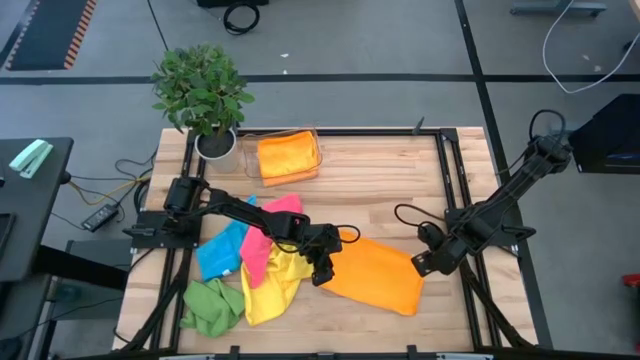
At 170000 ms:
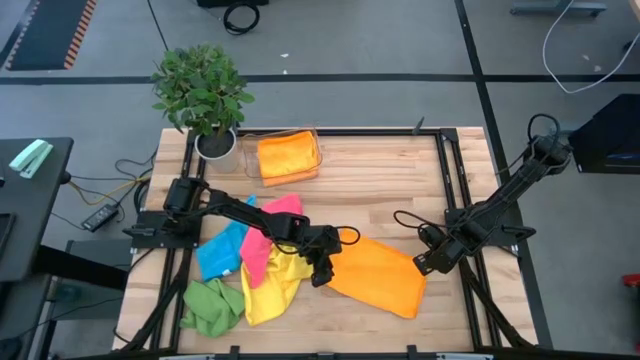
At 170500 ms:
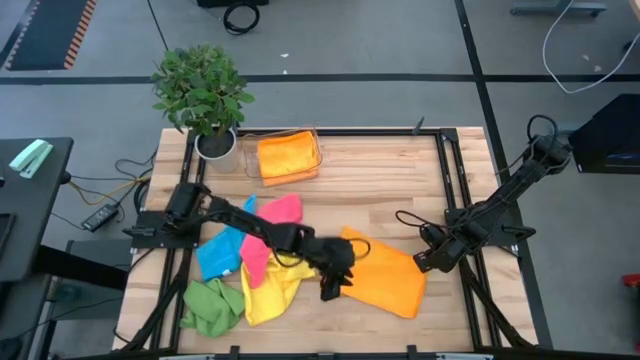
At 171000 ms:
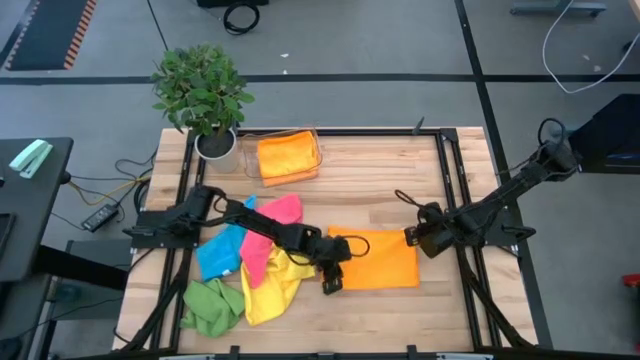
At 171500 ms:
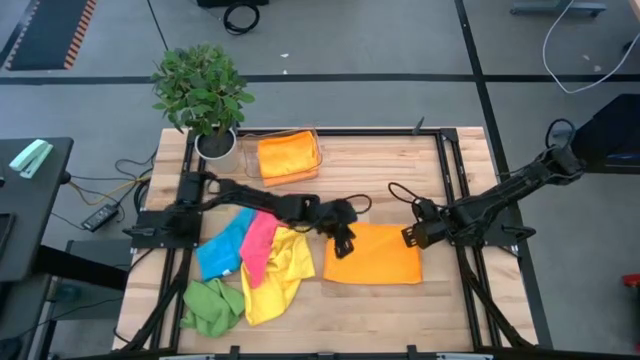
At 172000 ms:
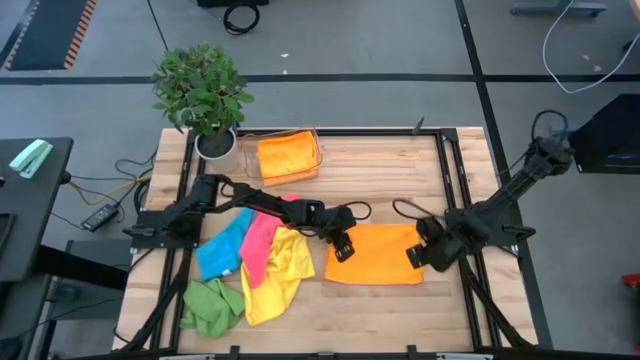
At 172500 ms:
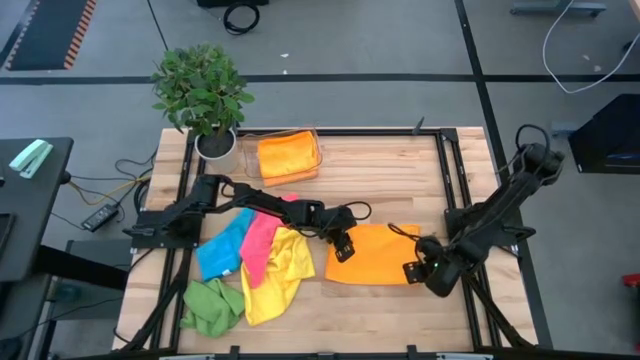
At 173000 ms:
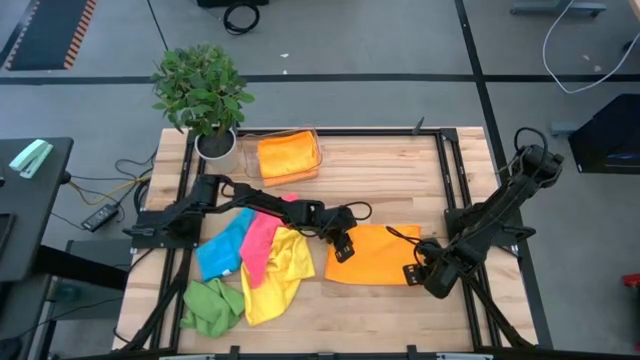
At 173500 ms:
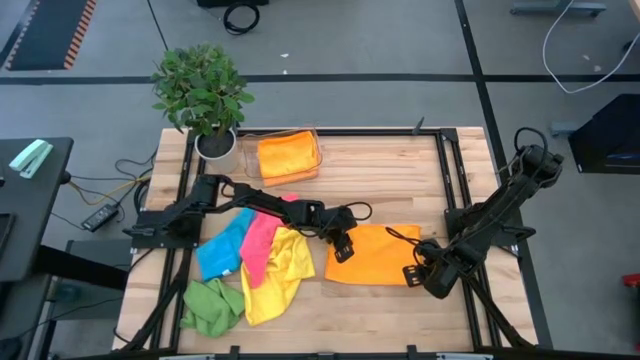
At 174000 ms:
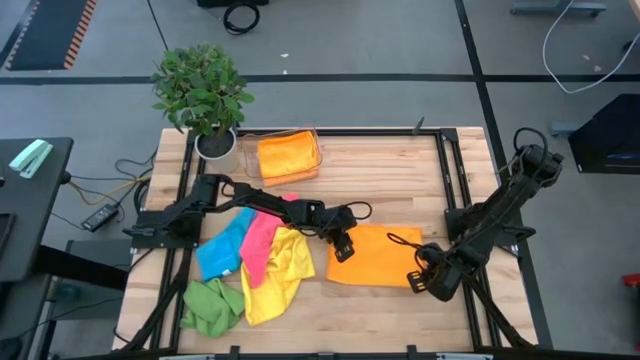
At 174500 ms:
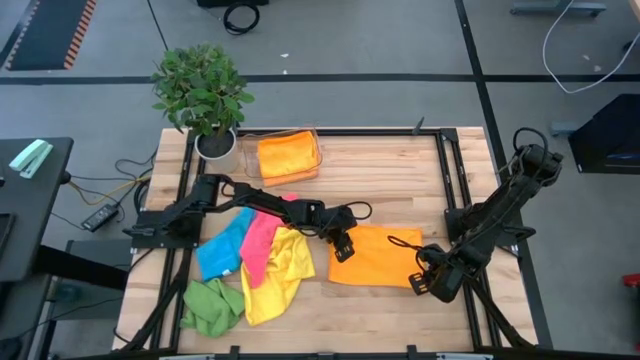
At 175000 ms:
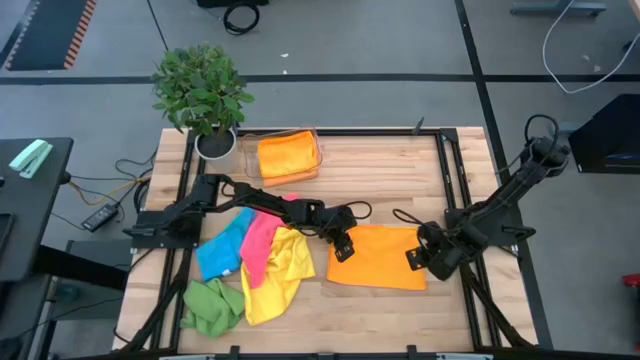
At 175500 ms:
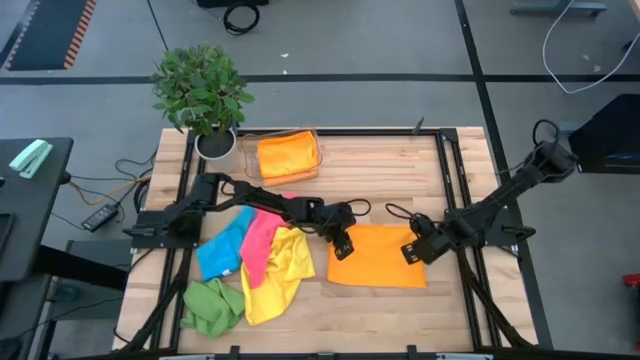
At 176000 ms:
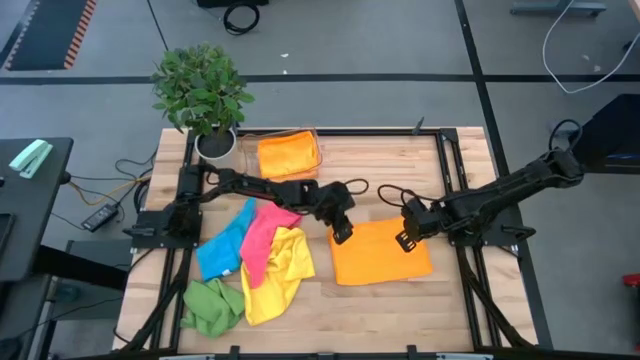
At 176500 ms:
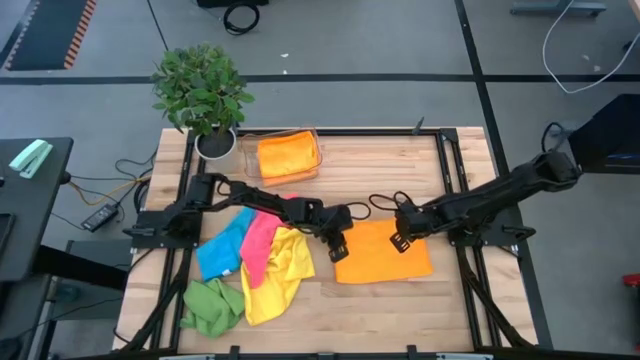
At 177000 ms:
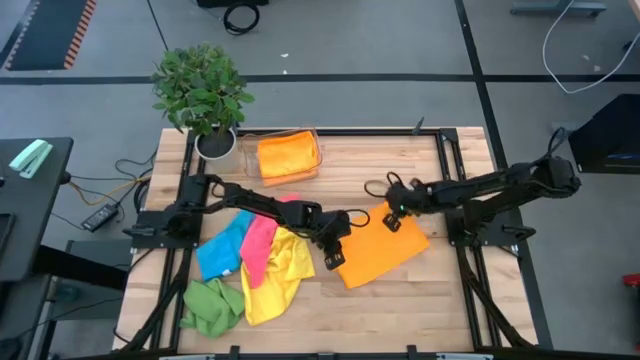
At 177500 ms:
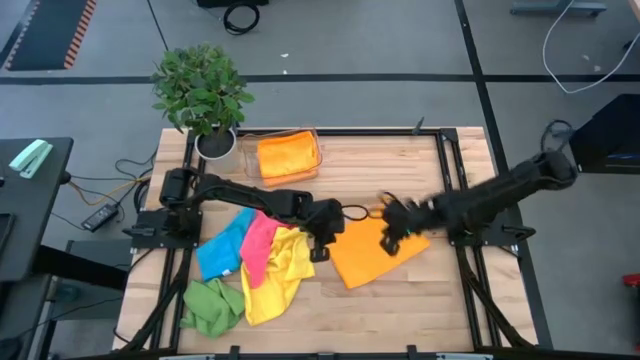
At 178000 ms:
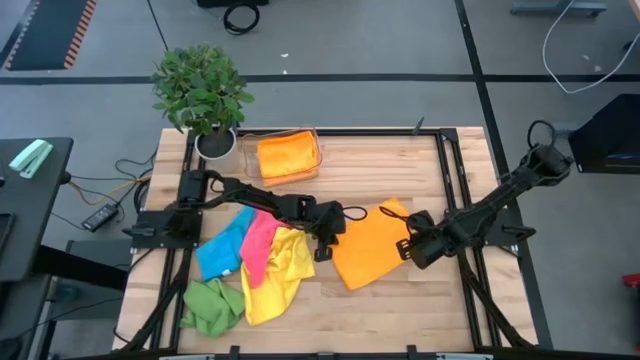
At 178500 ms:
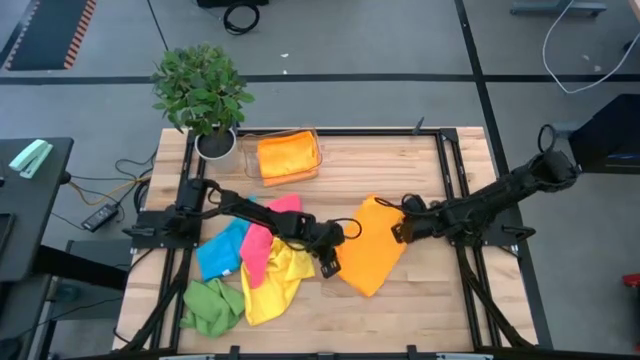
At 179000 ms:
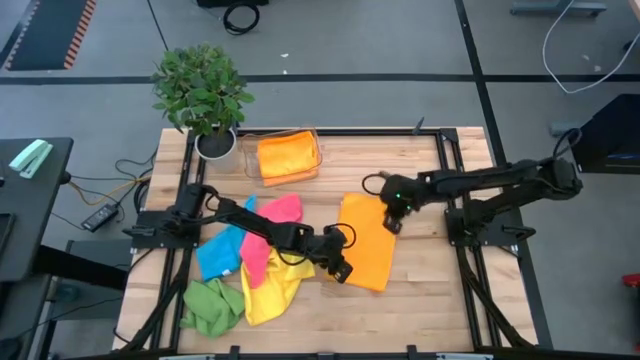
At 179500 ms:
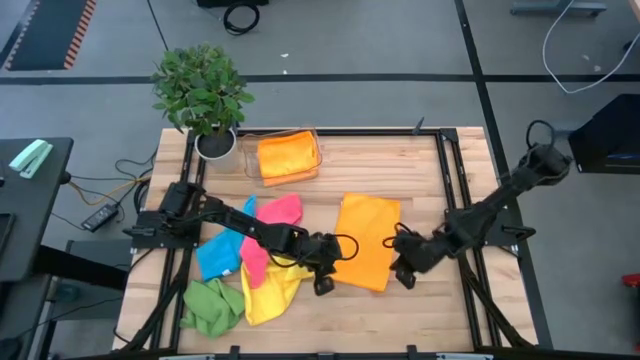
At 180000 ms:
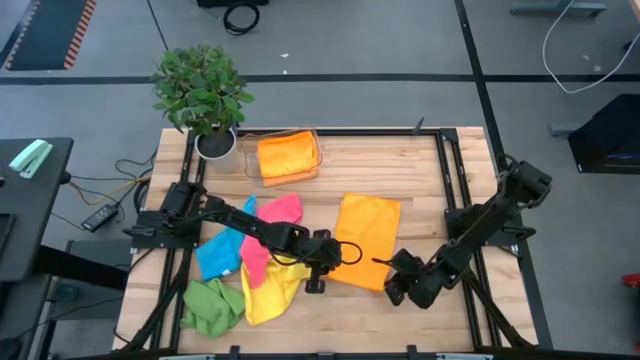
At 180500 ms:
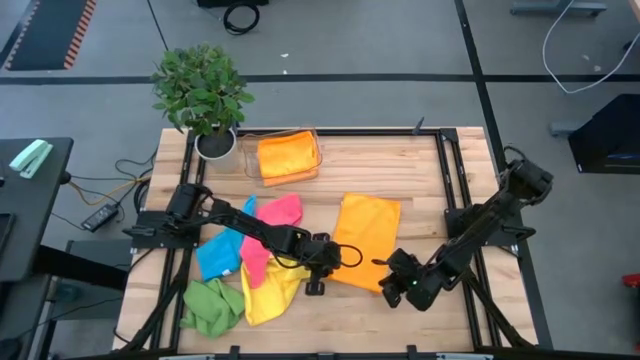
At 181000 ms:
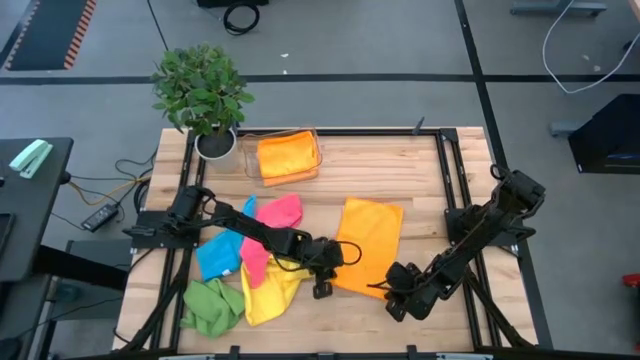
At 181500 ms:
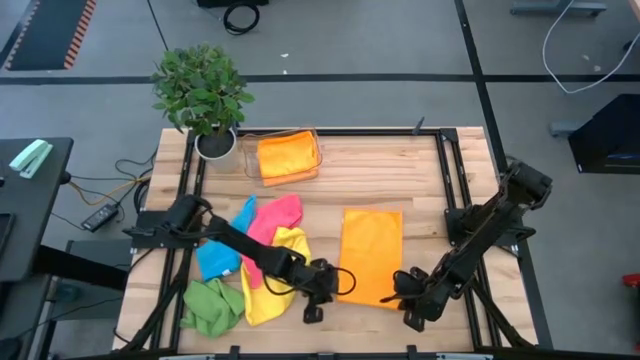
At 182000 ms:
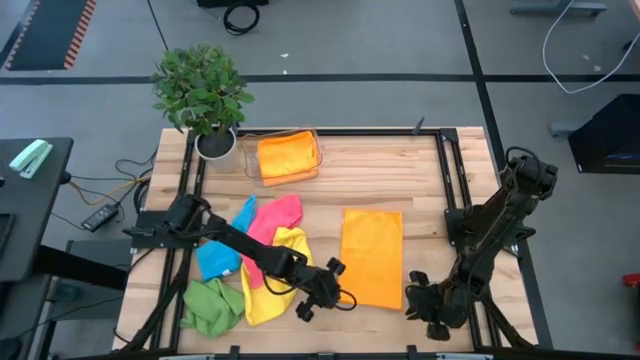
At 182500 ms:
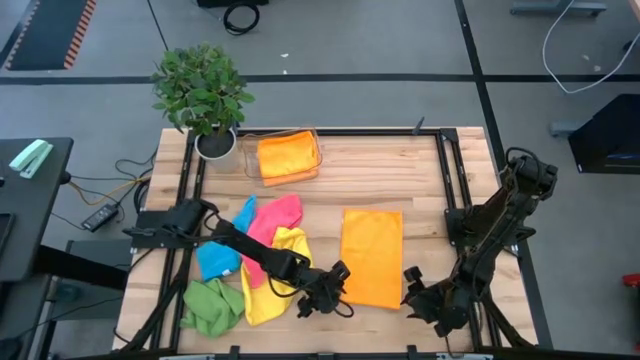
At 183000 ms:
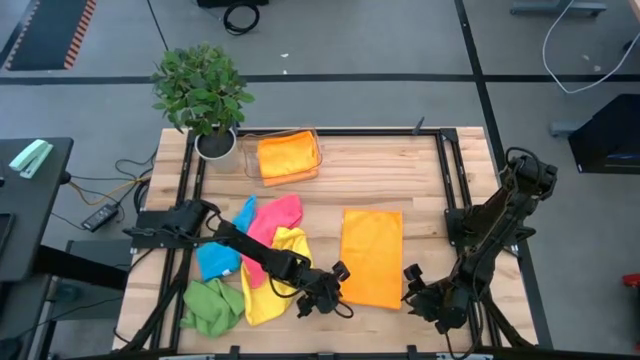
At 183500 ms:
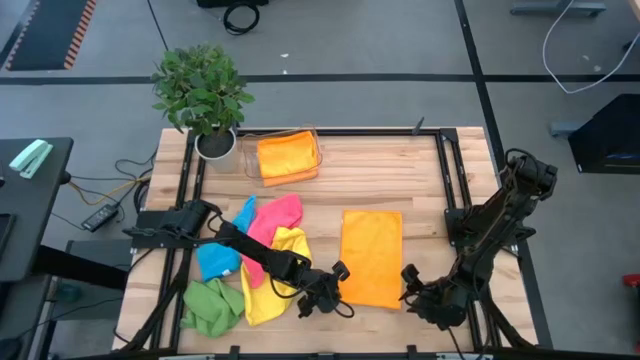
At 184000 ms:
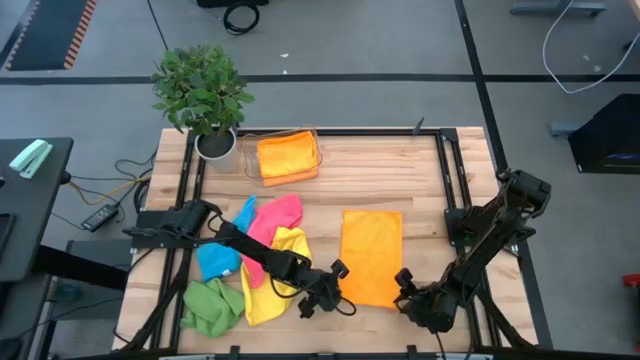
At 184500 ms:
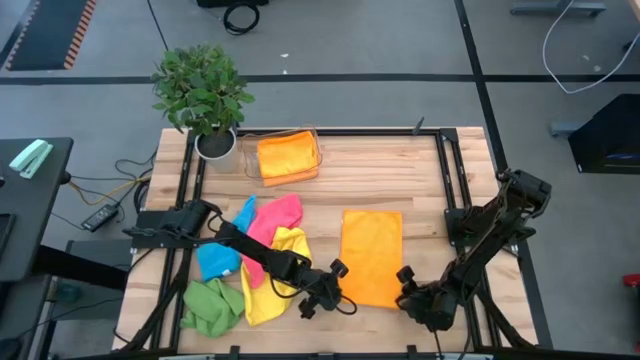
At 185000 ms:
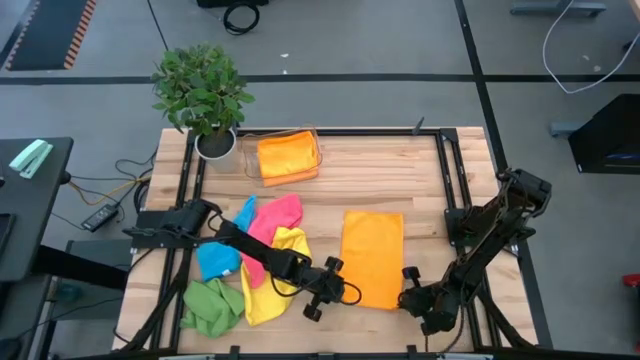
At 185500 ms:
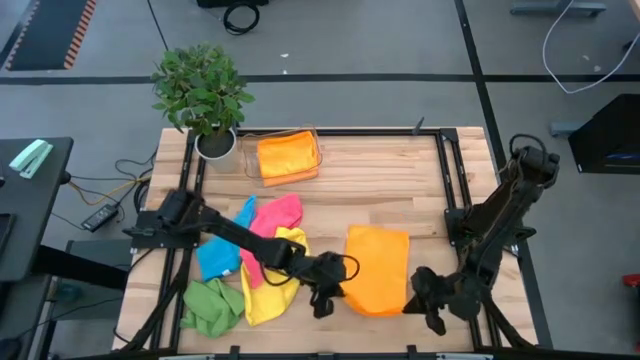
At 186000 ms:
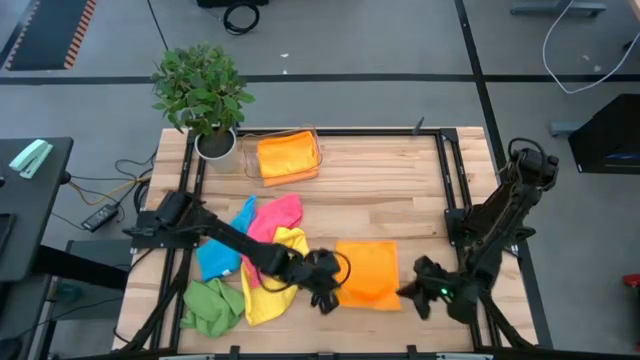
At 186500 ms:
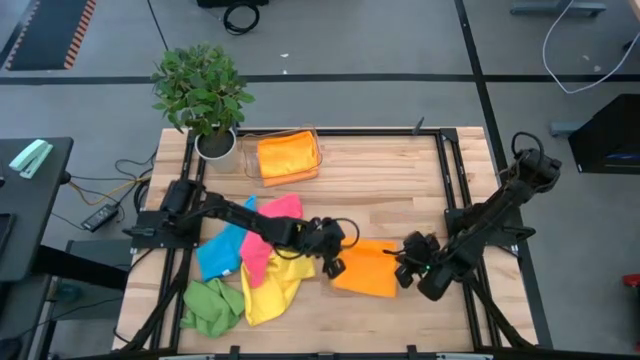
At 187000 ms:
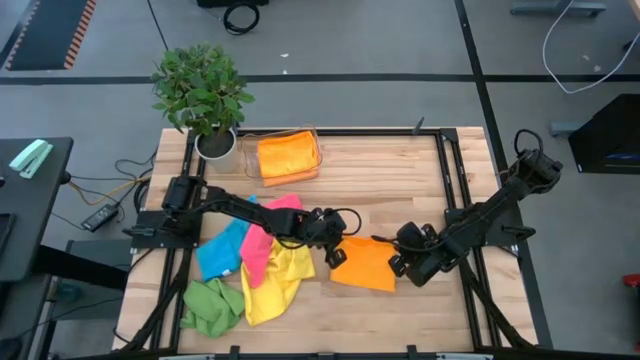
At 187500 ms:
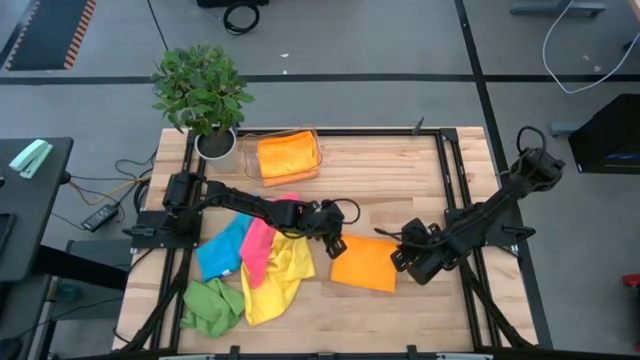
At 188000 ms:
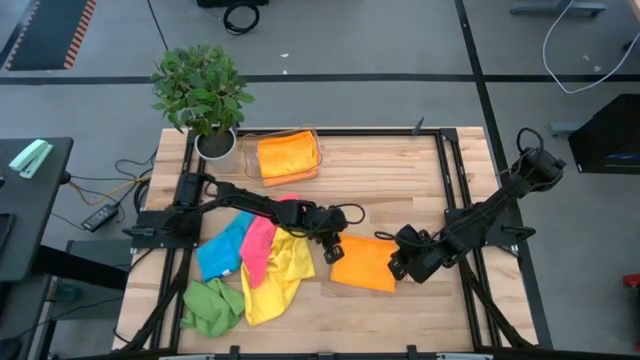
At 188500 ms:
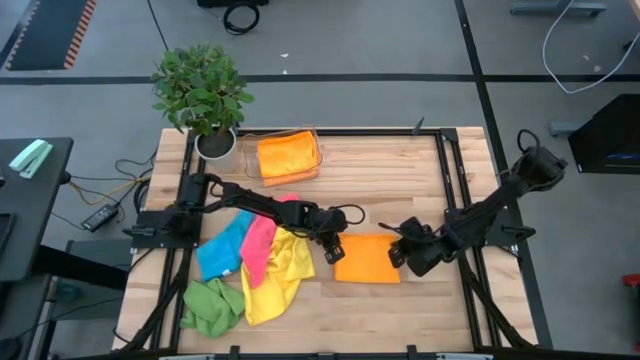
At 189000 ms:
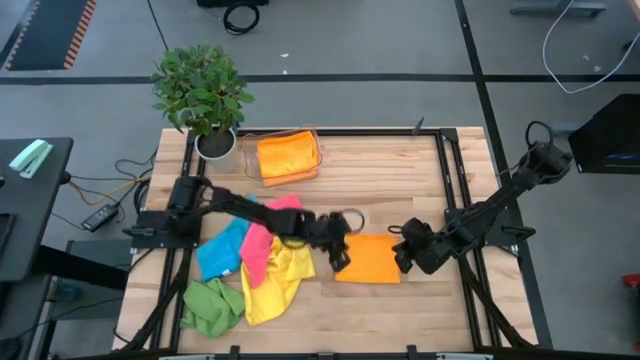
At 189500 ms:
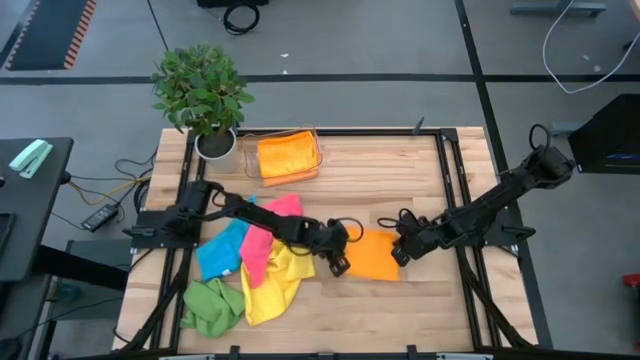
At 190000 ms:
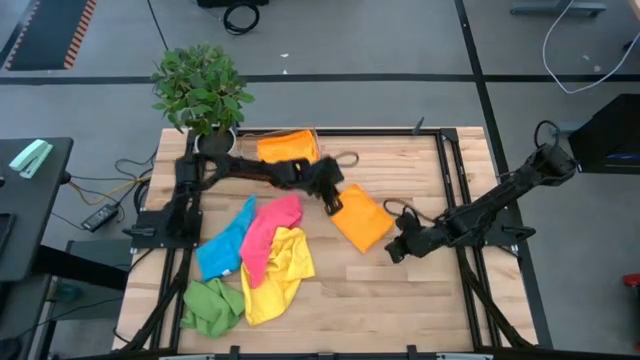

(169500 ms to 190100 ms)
Task: Fold microfiber towels
Fold the orange microfiber cloth

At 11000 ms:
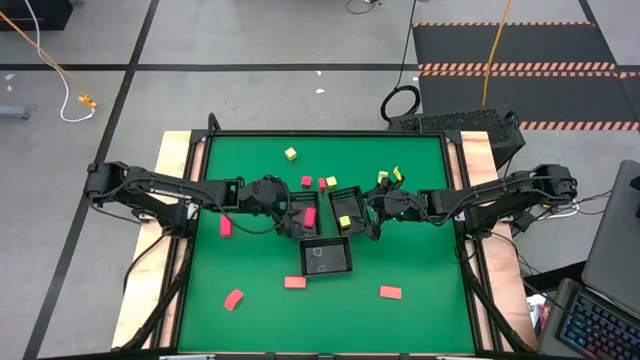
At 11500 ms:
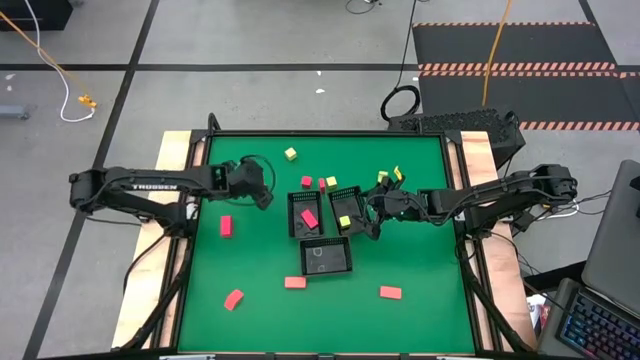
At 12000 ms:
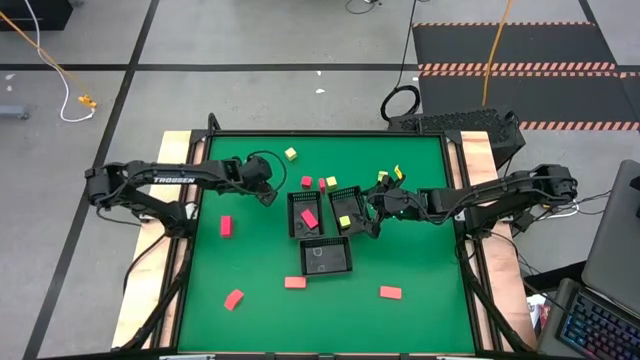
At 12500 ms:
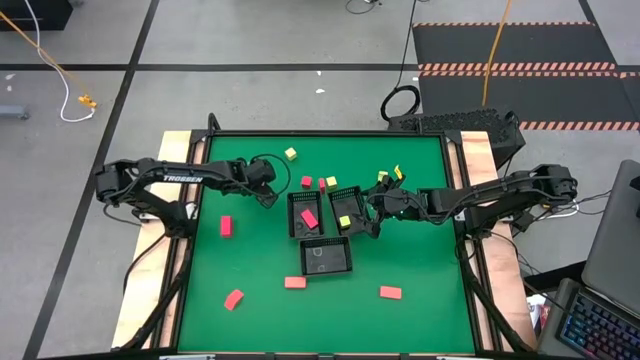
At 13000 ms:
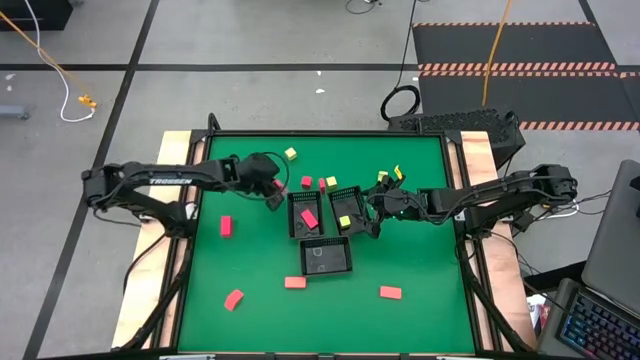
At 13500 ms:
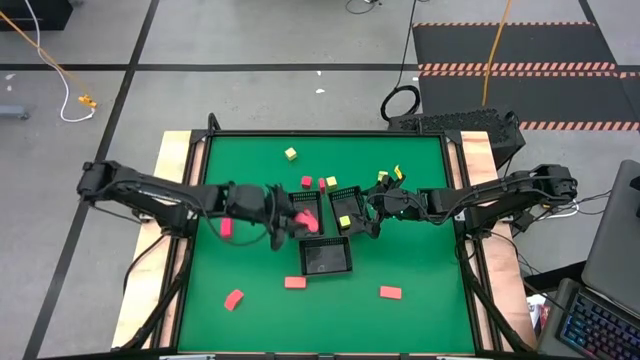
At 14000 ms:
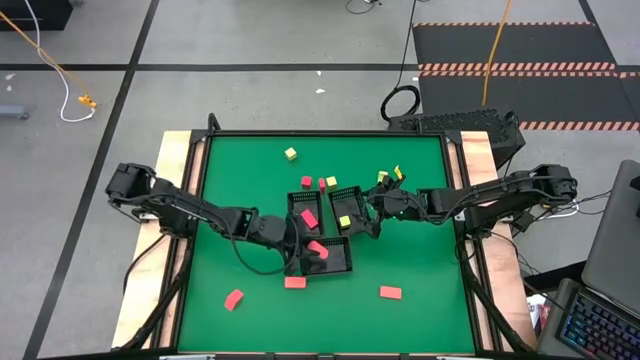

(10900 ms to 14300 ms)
Task: Sort & place blocks by color
Put the orange block into the bottom black bin
